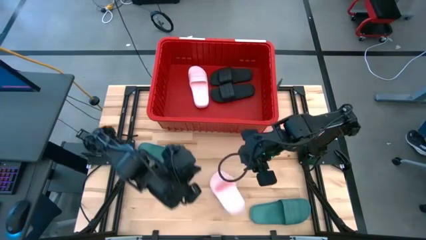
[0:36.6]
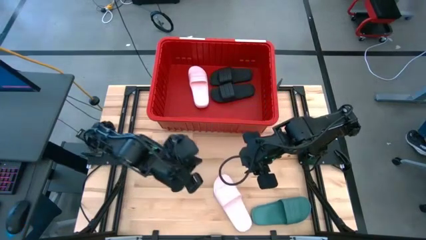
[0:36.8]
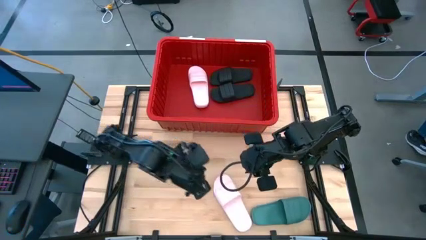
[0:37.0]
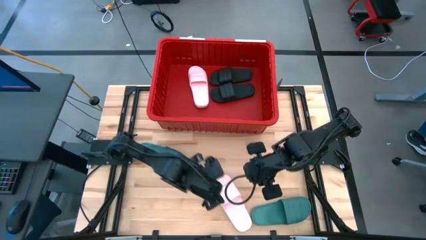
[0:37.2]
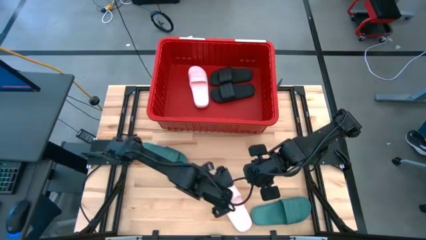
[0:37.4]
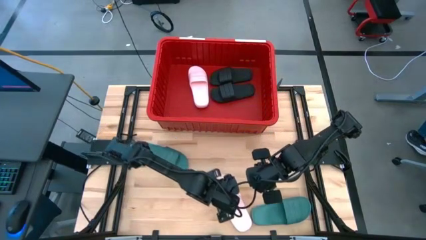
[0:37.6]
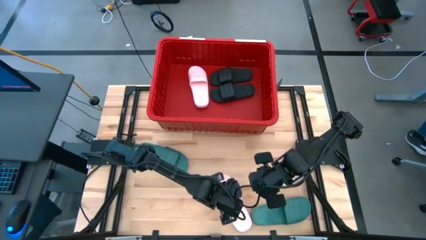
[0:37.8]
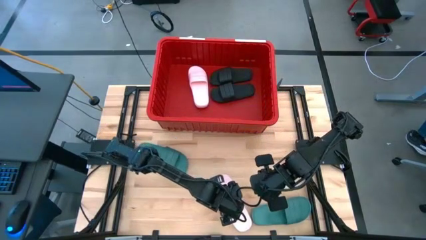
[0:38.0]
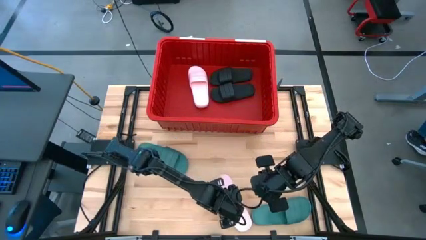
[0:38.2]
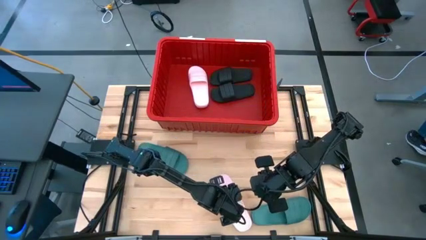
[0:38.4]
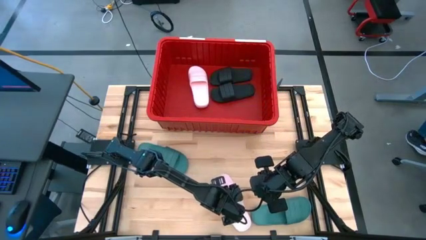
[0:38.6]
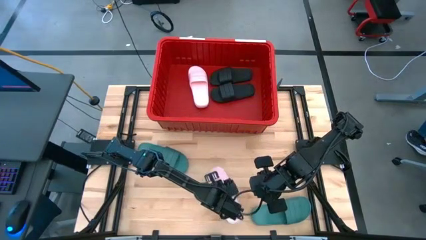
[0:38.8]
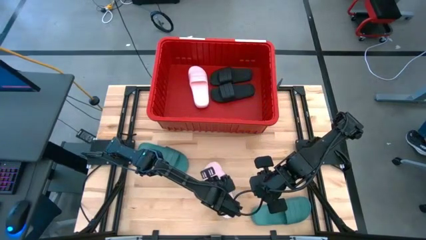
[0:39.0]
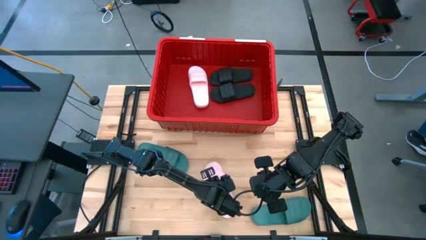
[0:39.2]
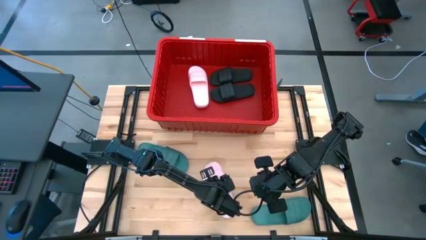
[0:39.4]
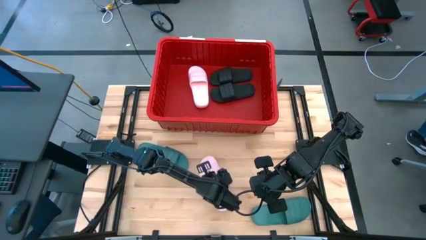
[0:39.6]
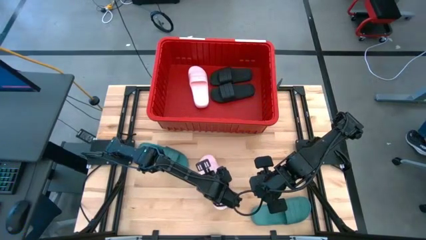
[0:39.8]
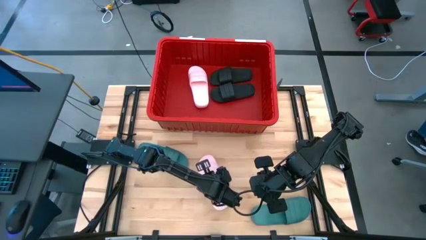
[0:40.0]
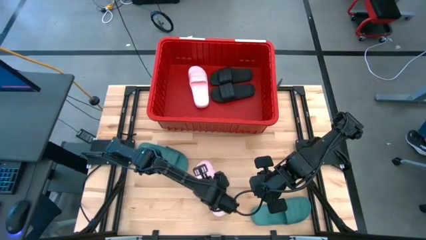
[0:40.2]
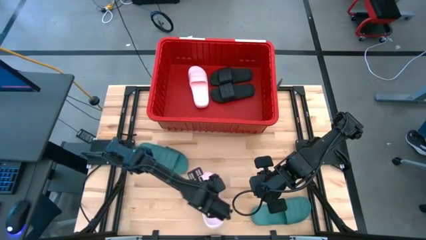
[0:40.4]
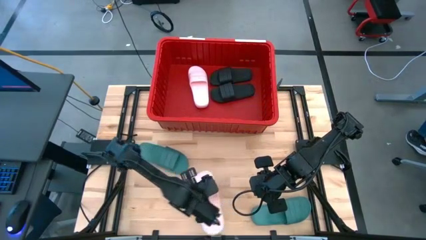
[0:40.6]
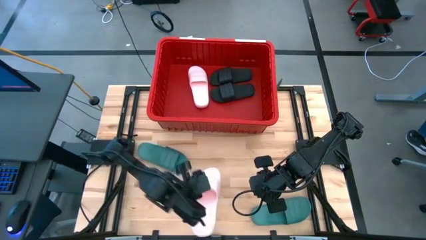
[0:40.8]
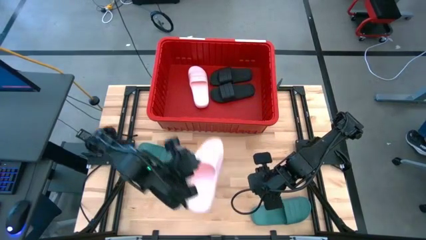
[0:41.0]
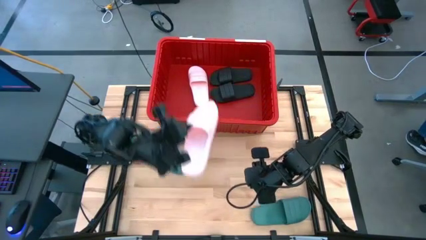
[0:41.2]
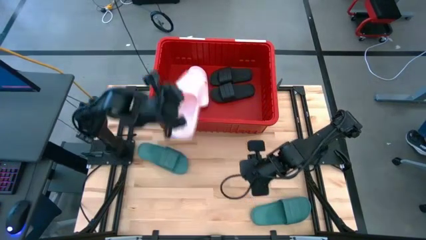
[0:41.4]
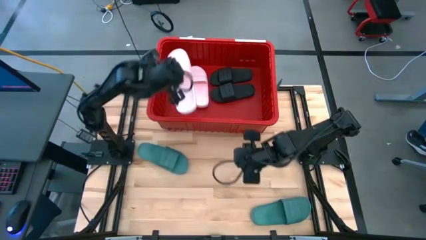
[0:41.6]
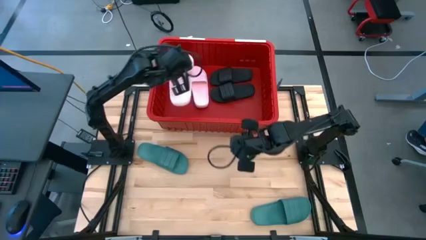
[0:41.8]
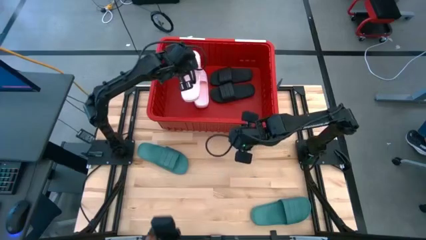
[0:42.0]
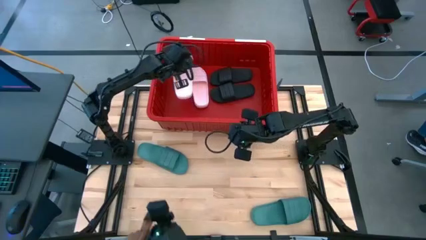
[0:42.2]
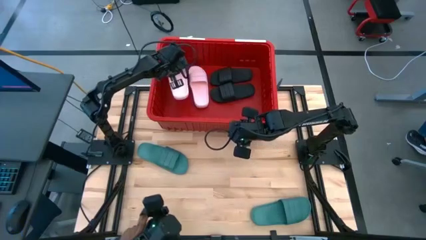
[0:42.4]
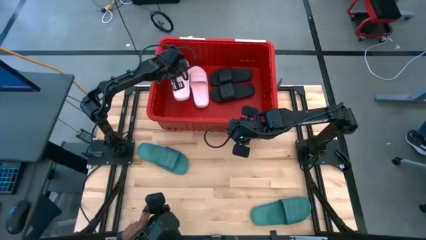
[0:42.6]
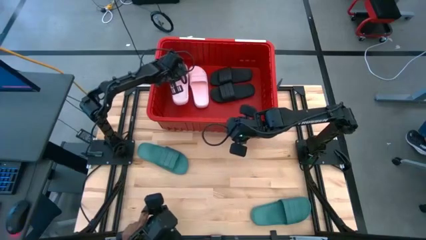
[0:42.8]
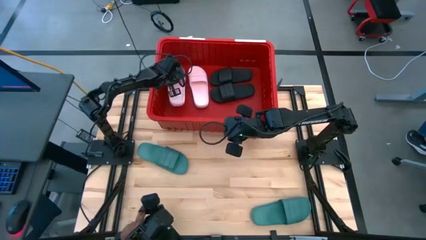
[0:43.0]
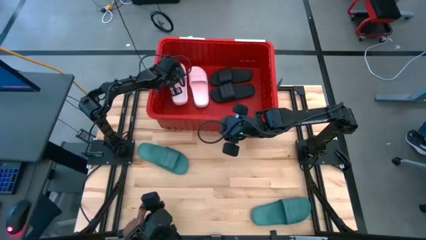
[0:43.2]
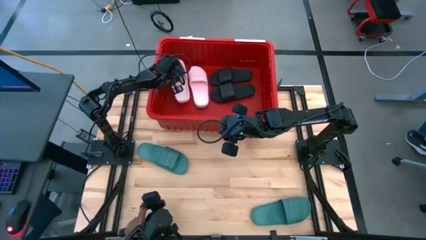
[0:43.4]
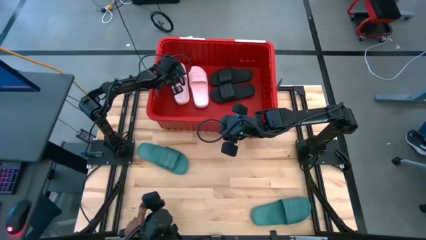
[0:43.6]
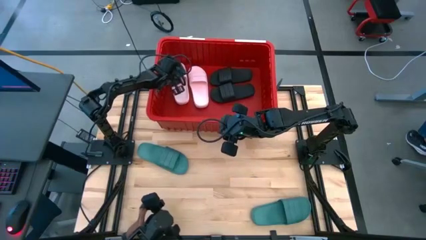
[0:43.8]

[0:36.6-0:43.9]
Task: Pick and place slides into bin
Put the pink slide into the red bin

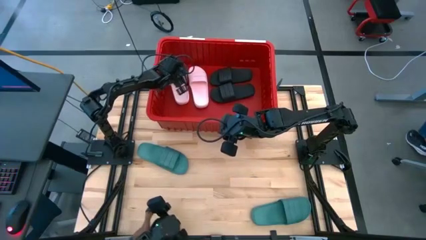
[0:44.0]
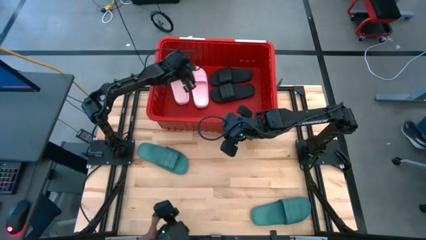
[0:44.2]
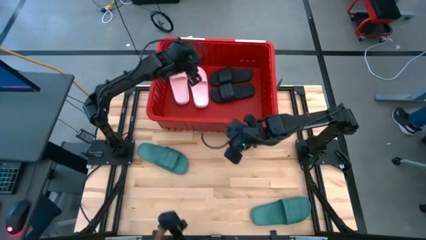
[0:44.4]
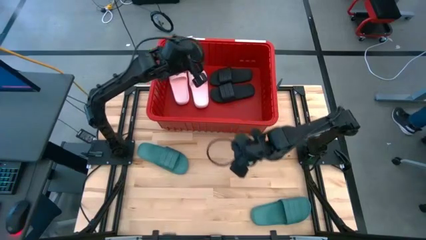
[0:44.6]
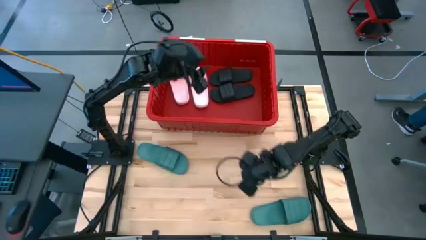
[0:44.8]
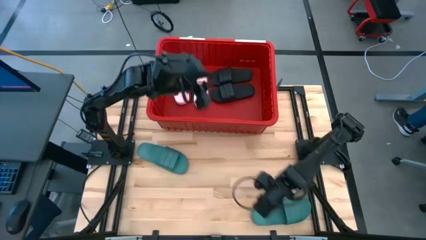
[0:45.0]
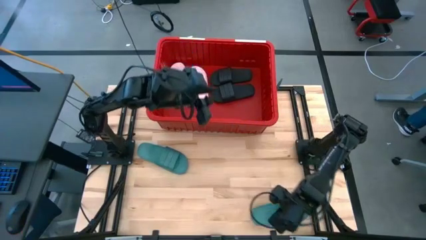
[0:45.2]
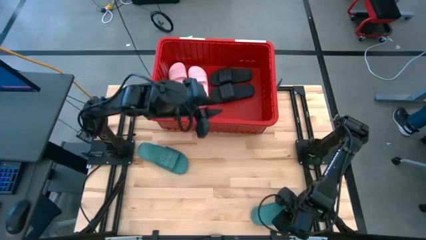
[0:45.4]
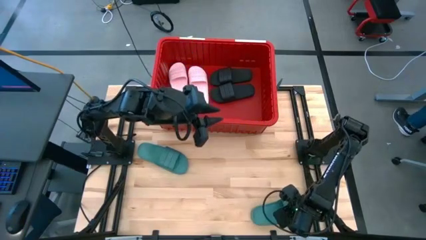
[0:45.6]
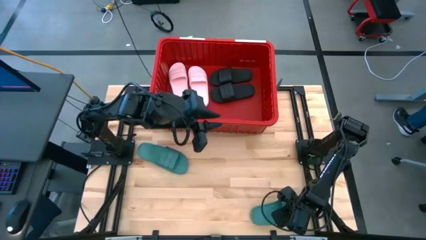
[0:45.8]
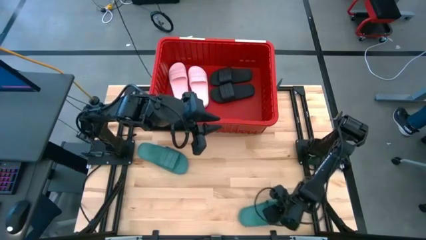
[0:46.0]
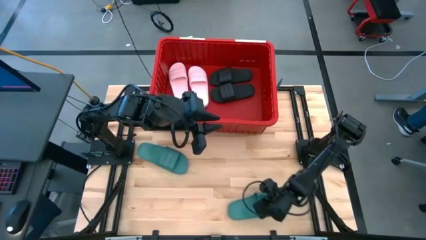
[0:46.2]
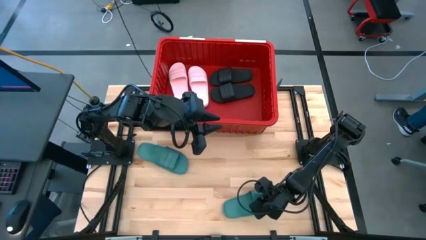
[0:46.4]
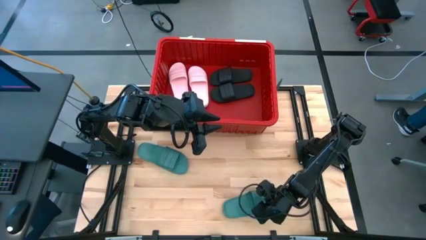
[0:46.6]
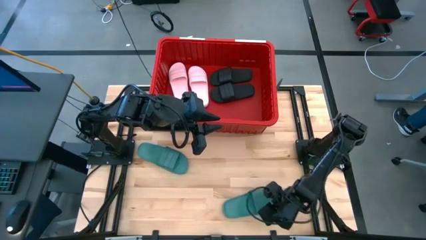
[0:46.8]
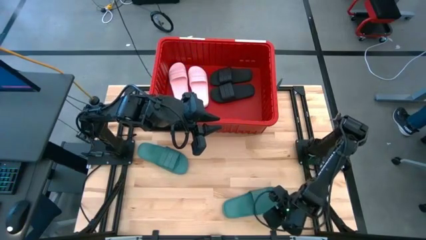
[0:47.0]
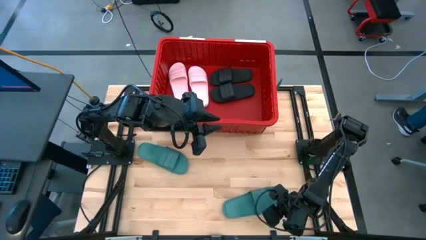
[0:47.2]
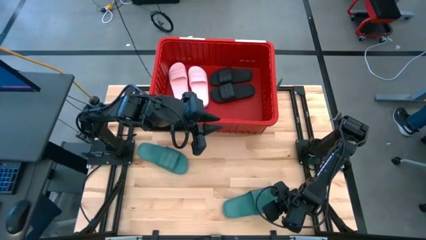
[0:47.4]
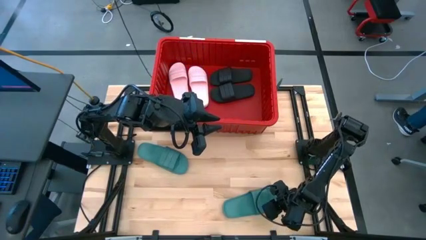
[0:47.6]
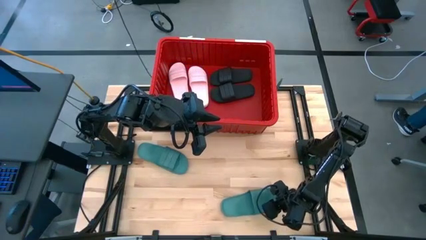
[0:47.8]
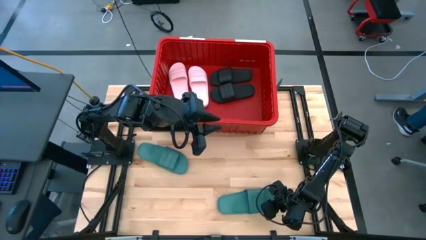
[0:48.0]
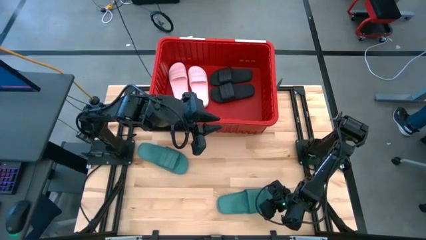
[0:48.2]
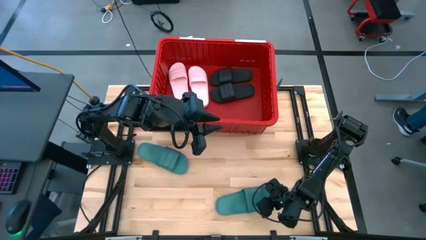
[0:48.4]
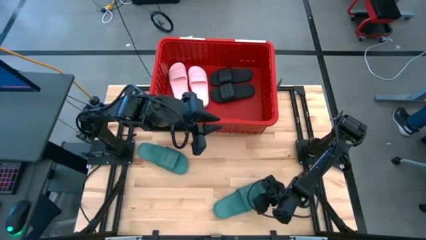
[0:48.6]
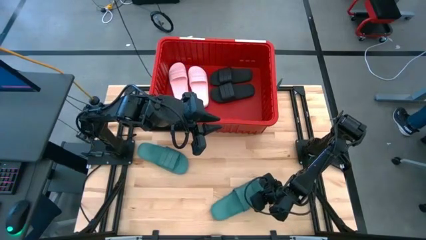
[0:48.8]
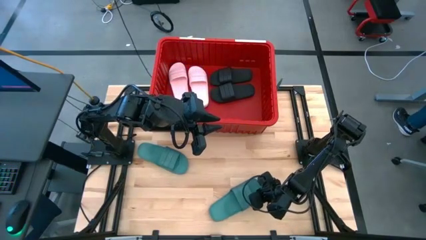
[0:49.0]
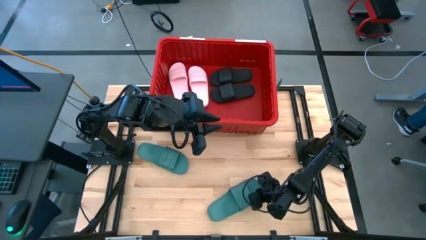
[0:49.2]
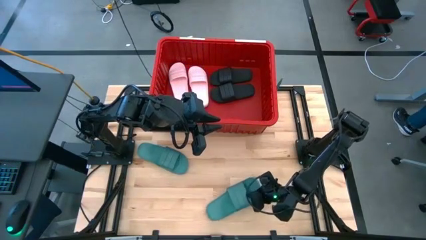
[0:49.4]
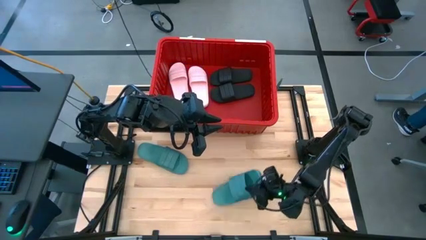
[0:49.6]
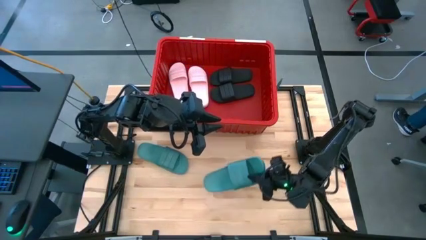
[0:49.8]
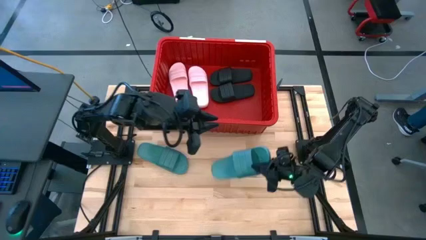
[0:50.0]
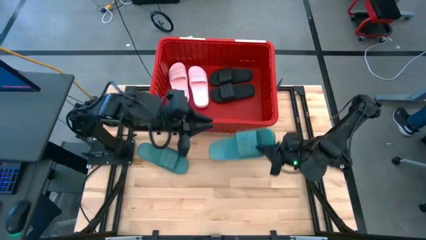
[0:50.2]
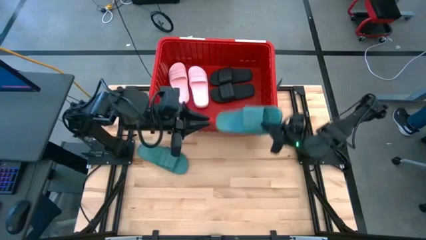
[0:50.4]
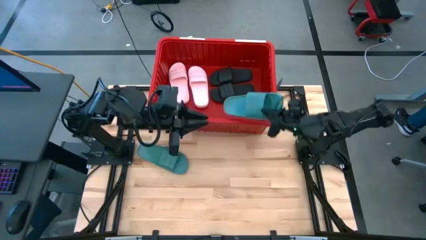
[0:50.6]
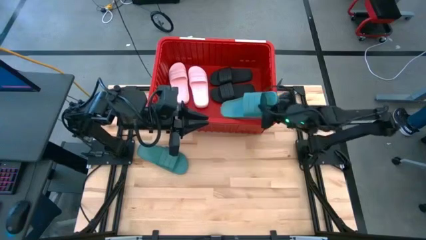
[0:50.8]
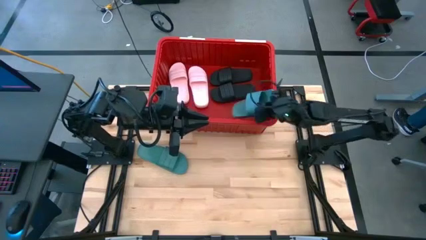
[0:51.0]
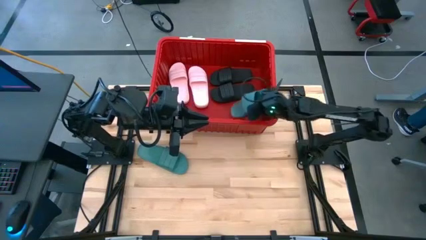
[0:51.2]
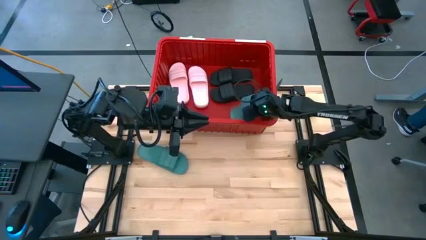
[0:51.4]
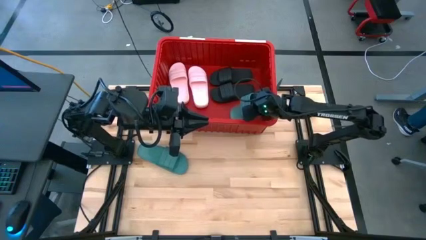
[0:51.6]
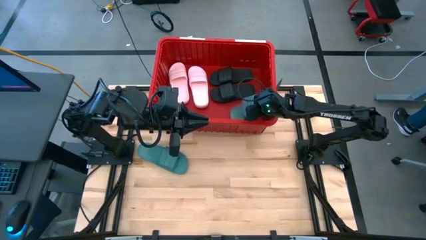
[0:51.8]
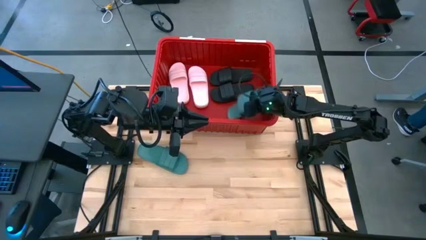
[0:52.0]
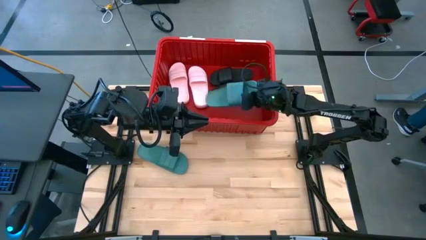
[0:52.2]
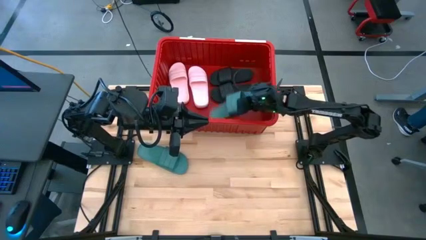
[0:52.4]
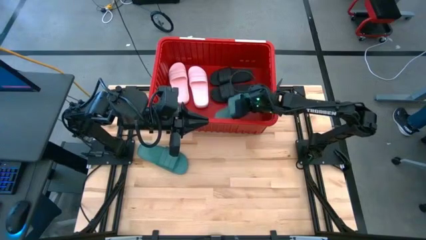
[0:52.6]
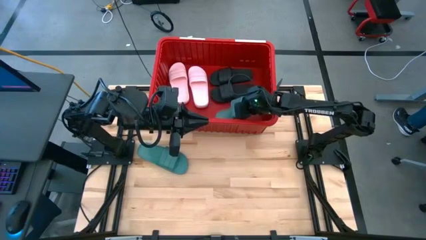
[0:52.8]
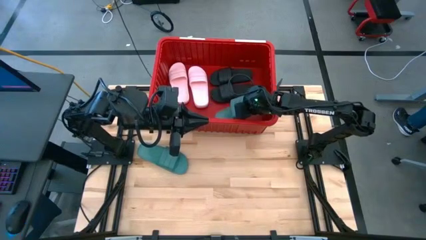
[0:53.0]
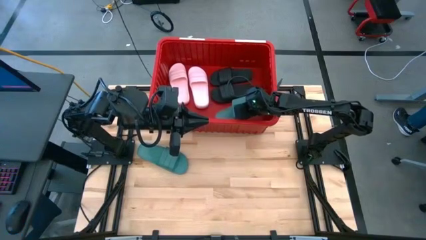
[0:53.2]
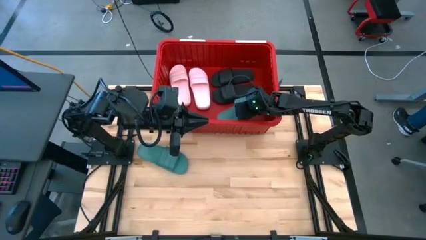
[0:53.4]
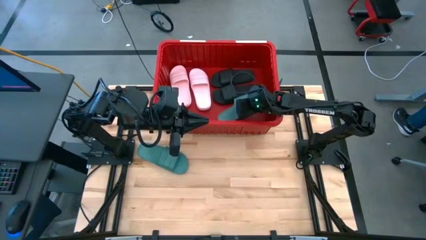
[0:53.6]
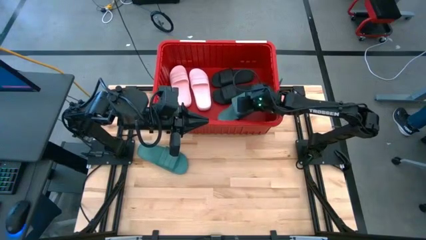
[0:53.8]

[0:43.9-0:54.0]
Put the bottom green slide into the red bin
